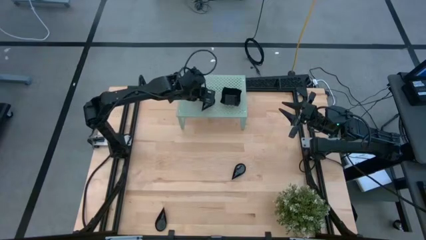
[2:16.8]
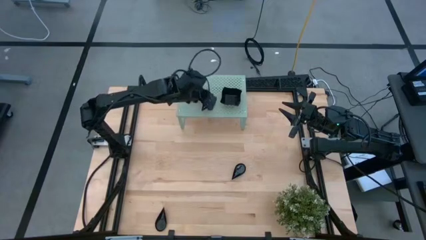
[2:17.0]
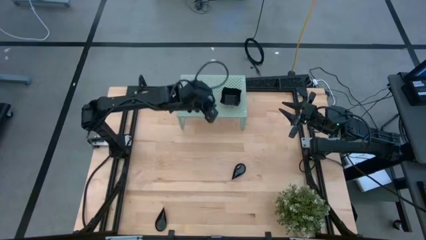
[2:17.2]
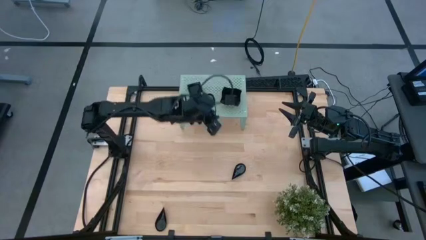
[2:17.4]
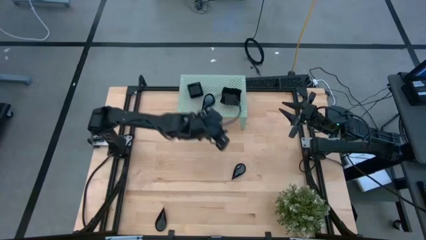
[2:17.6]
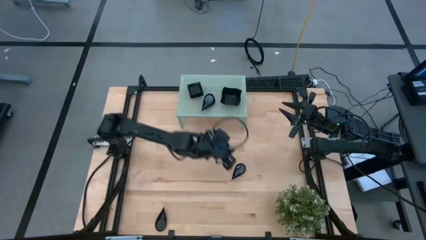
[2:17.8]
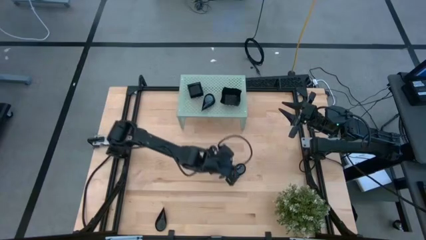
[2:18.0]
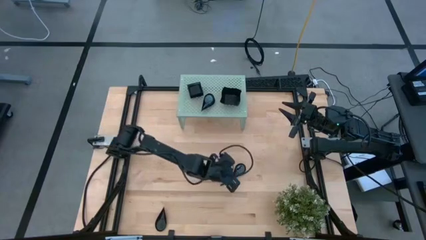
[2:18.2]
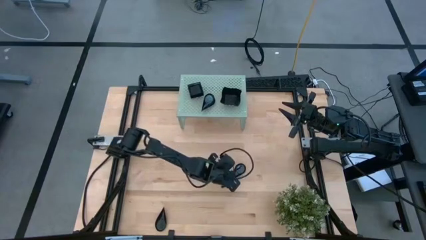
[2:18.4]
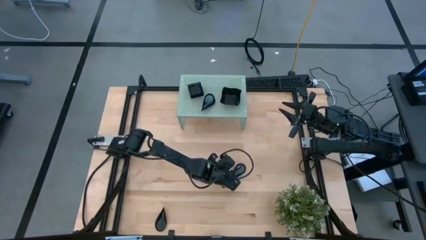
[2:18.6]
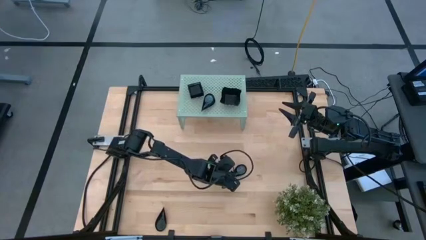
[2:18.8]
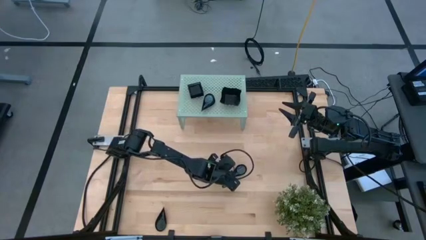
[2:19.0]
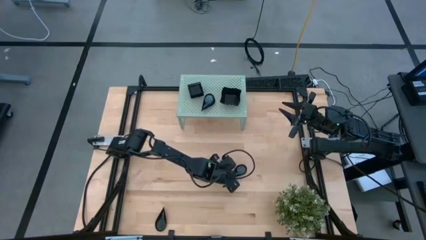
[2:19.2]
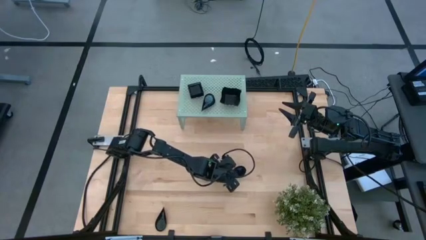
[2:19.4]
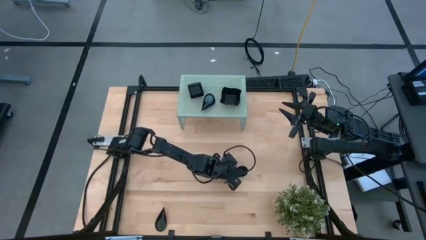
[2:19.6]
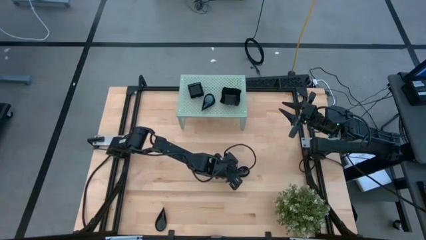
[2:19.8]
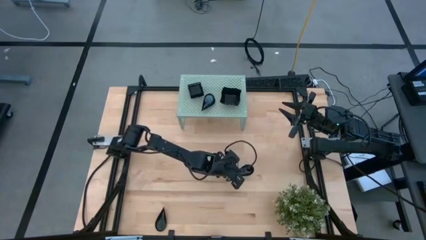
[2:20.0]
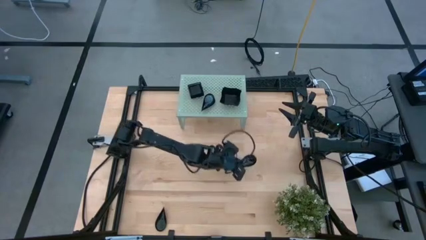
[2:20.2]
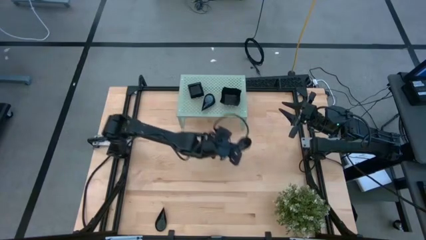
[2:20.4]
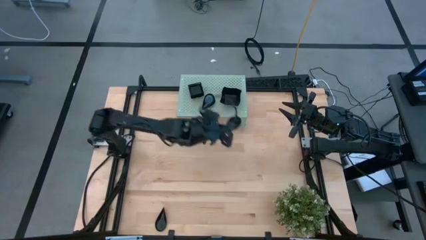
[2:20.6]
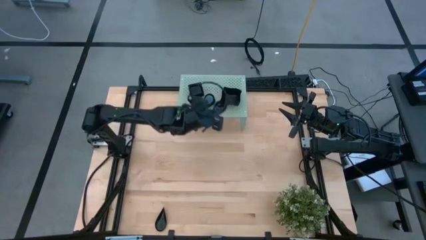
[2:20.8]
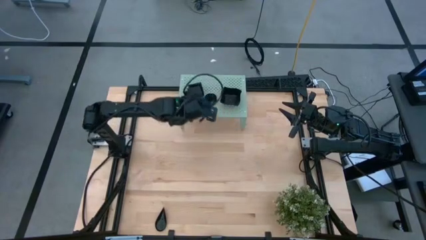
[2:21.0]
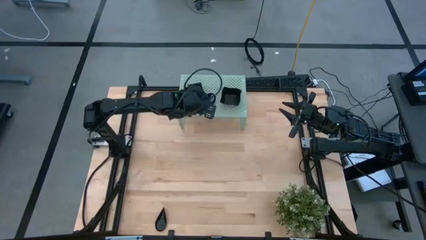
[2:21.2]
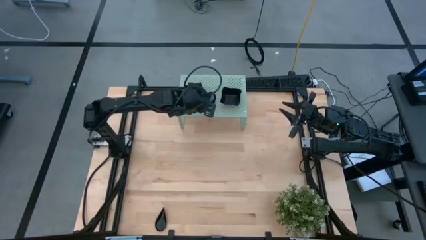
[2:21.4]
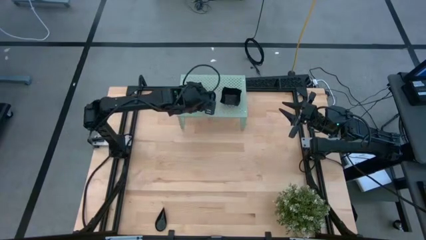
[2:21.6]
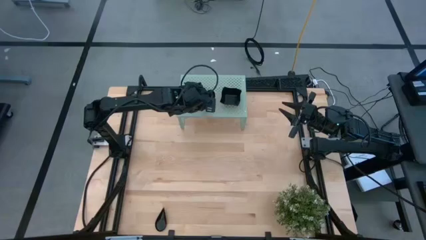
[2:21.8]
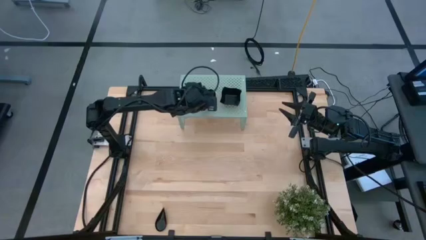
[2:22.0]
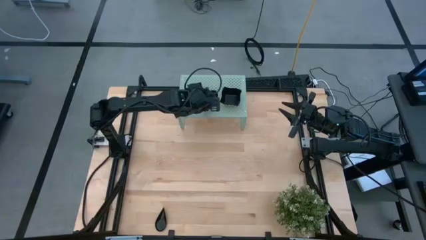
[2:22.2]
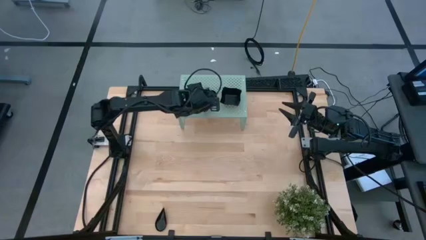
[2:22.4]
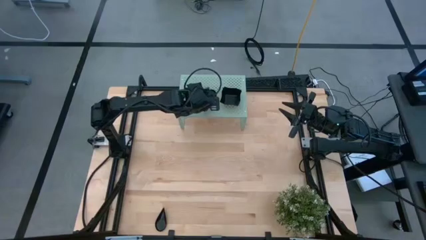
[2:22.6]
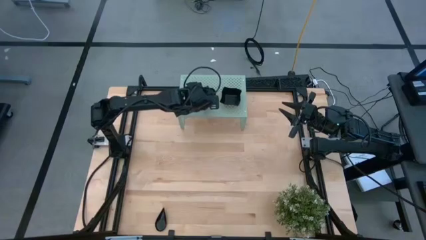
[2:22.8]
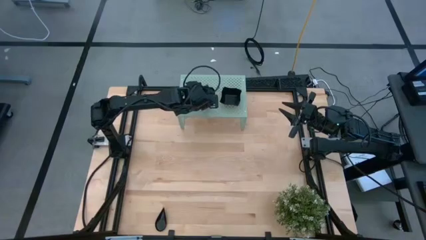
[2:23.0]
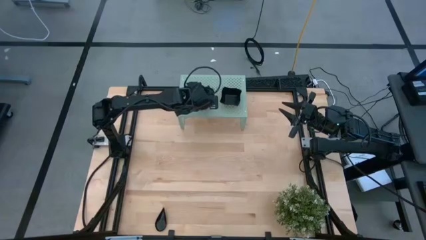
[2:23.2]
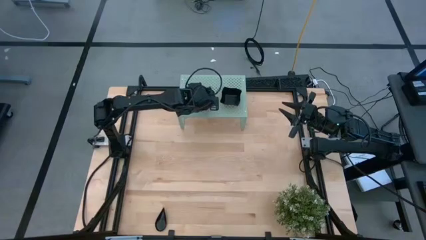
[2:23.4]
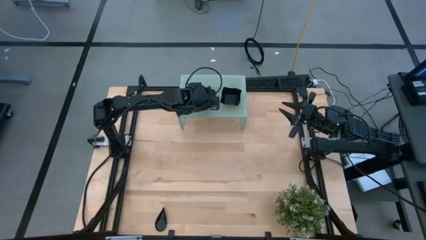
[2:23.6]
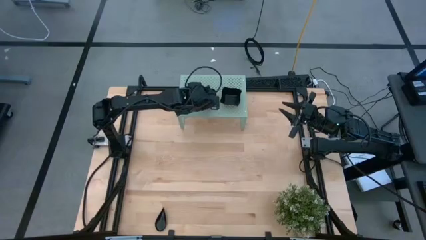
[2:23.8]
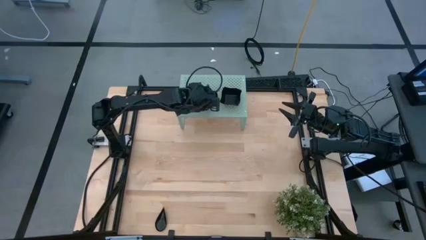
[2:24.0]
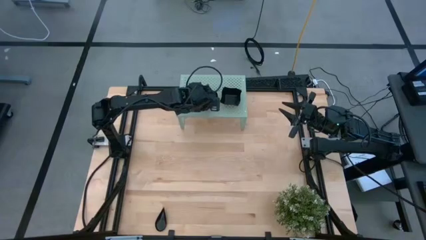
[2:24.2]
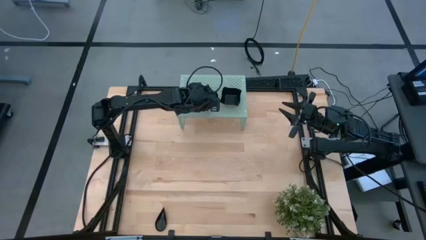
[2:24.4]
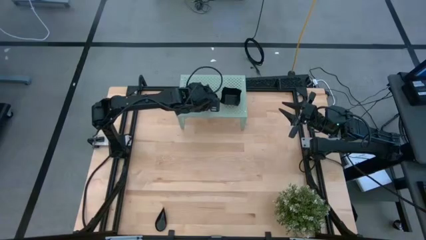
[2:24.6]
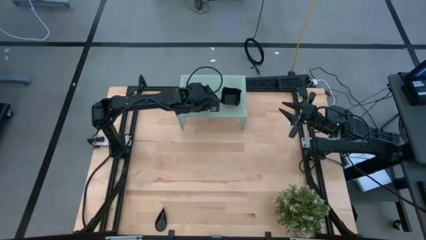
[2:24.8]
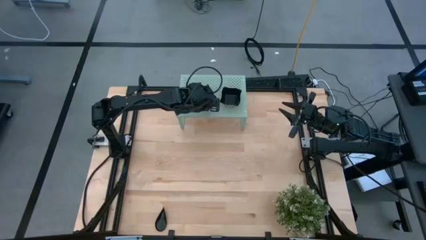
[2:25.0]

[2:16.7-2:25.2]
Task: Pick & Place Mini shaped plates
Stack the black drop shaped plate on top of the other black drop shaped plate on the shelf

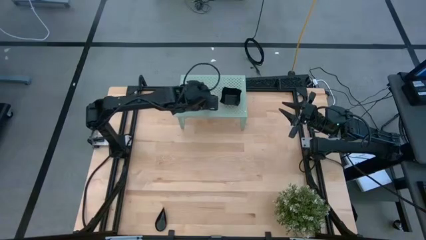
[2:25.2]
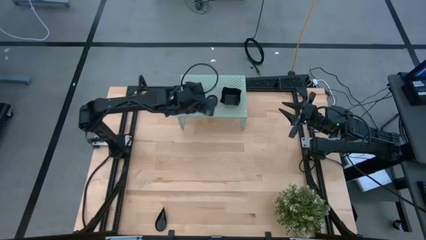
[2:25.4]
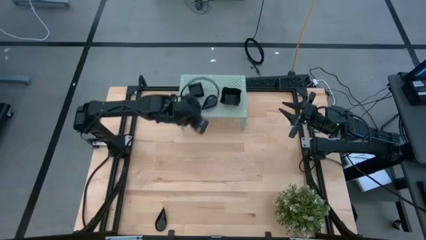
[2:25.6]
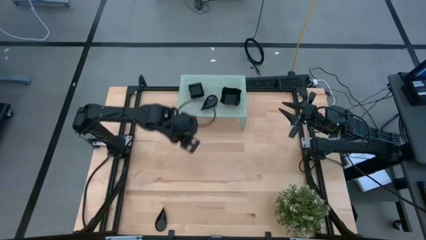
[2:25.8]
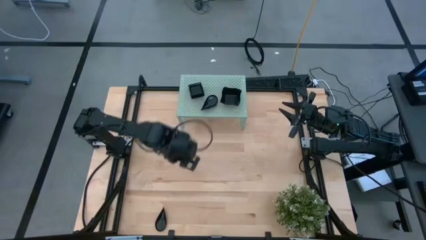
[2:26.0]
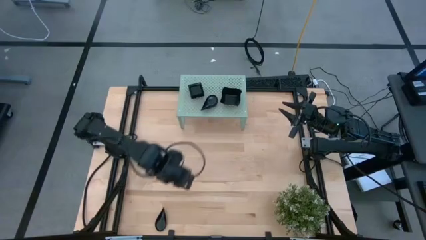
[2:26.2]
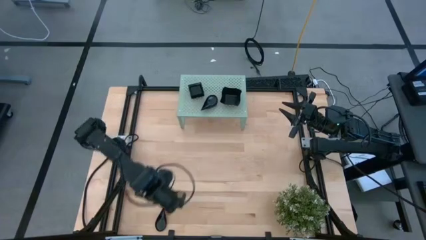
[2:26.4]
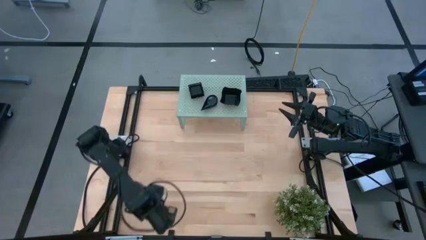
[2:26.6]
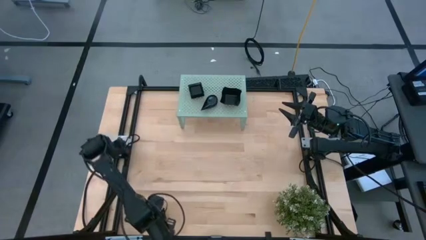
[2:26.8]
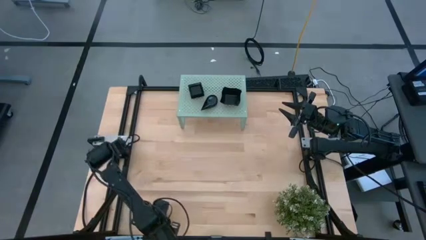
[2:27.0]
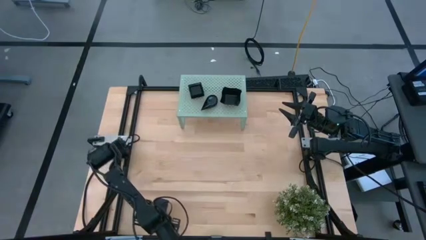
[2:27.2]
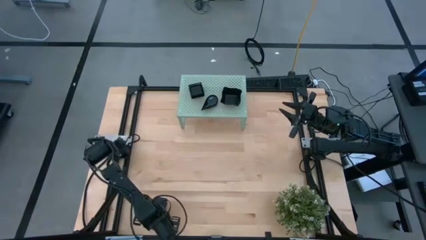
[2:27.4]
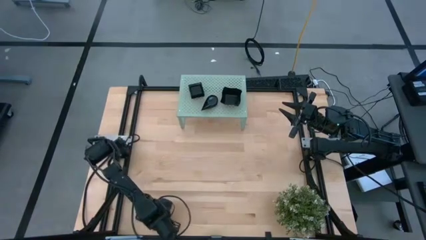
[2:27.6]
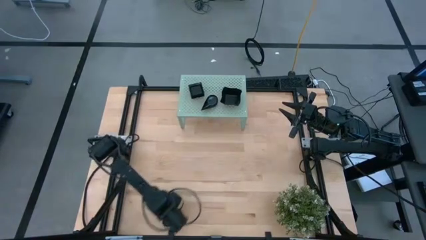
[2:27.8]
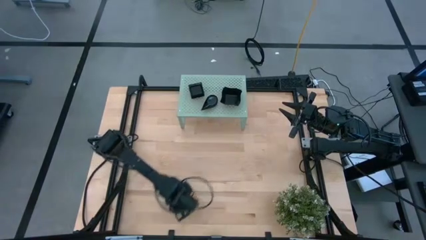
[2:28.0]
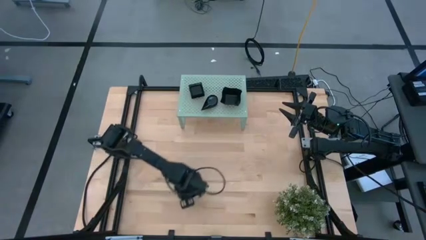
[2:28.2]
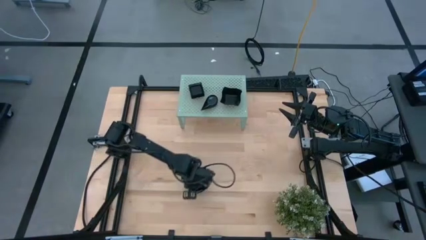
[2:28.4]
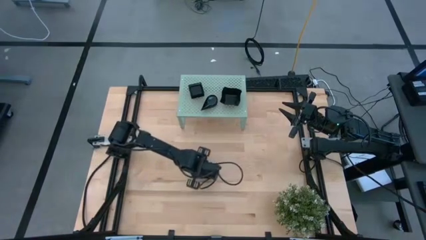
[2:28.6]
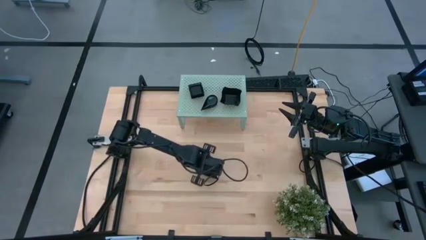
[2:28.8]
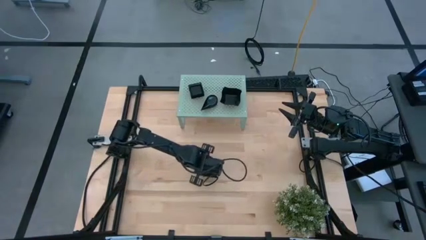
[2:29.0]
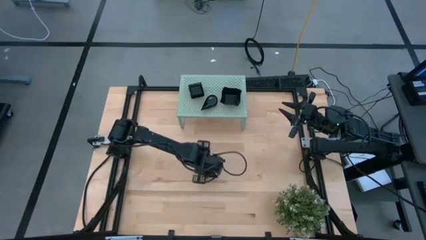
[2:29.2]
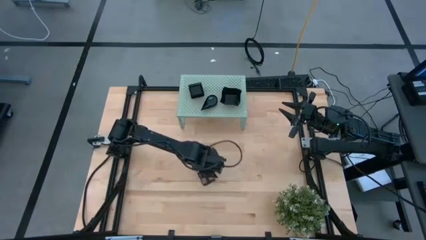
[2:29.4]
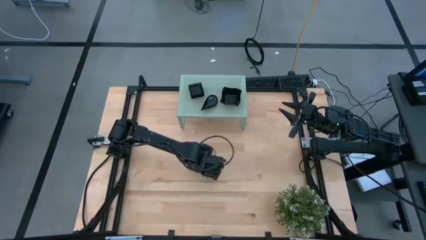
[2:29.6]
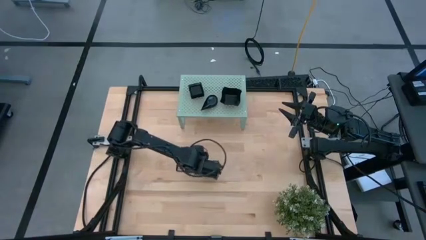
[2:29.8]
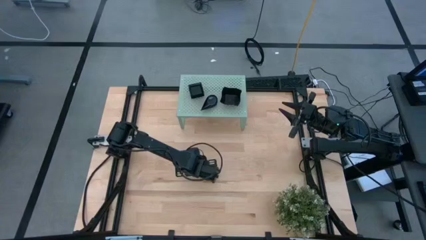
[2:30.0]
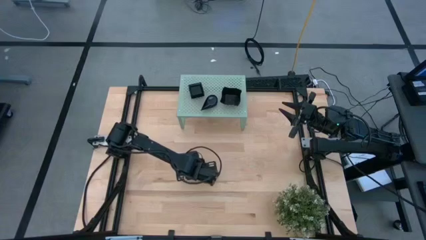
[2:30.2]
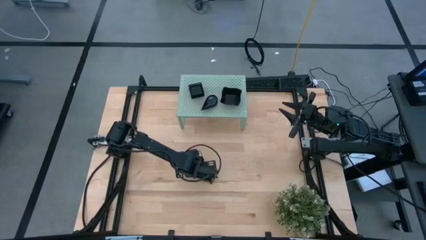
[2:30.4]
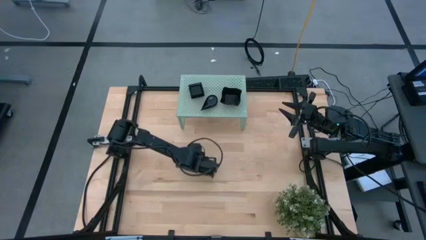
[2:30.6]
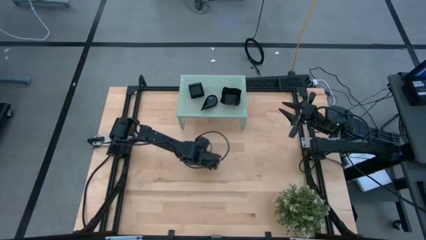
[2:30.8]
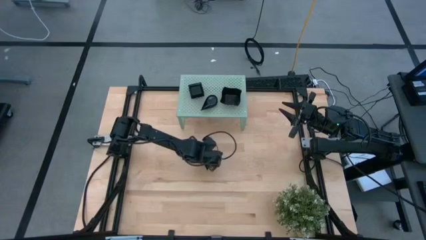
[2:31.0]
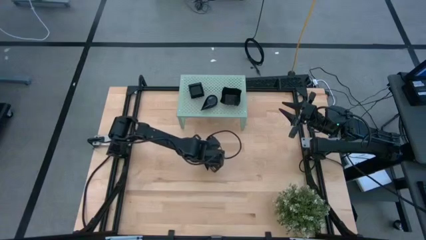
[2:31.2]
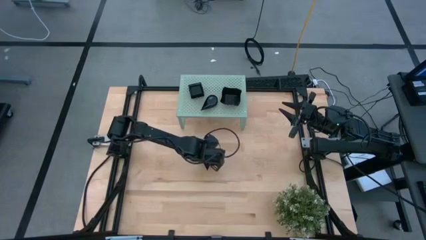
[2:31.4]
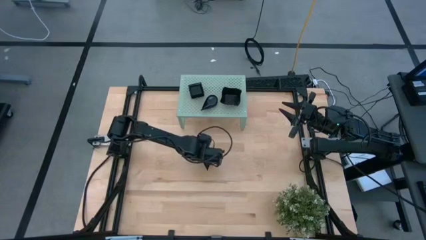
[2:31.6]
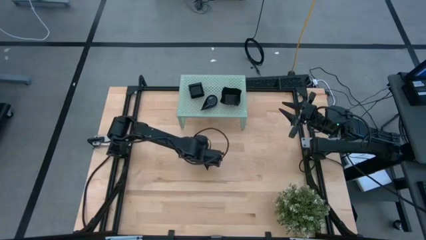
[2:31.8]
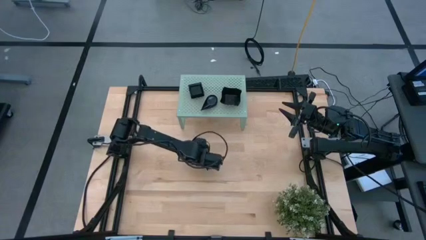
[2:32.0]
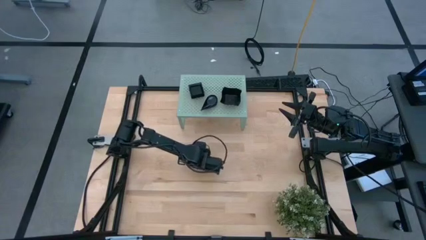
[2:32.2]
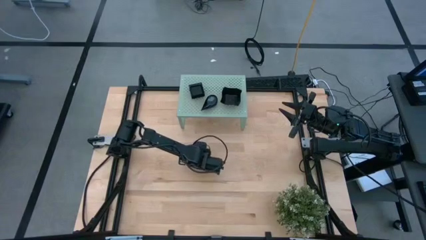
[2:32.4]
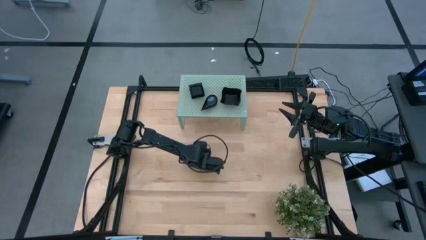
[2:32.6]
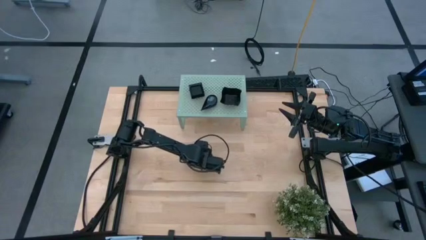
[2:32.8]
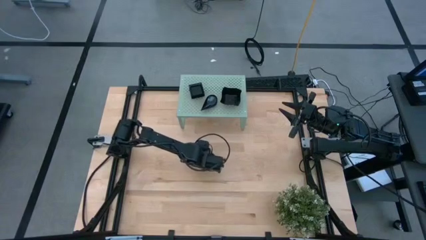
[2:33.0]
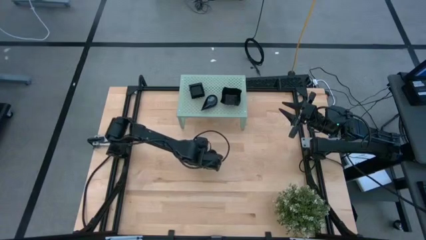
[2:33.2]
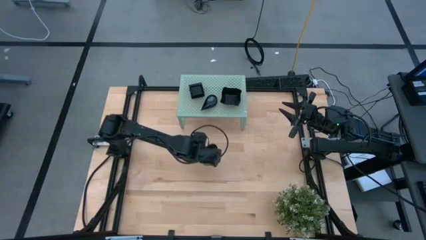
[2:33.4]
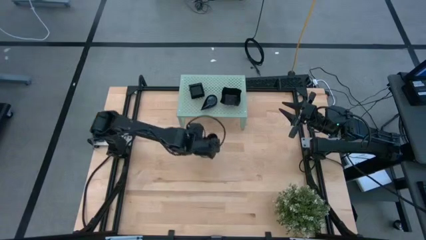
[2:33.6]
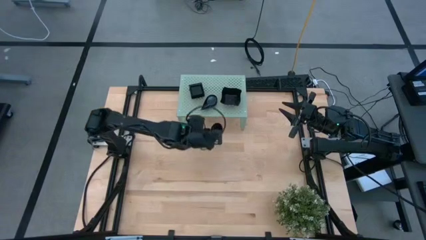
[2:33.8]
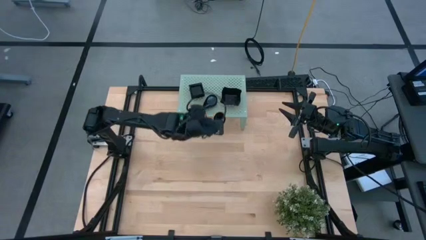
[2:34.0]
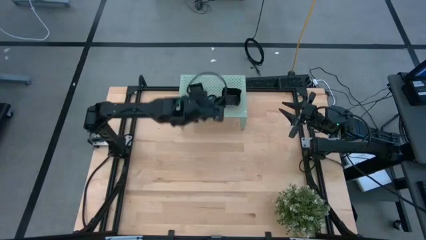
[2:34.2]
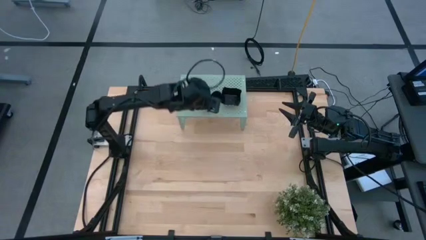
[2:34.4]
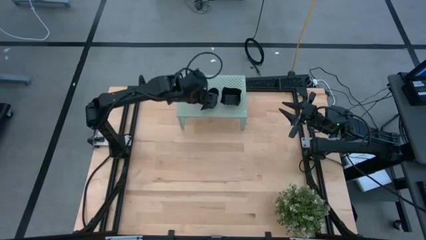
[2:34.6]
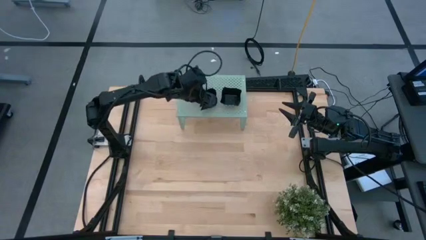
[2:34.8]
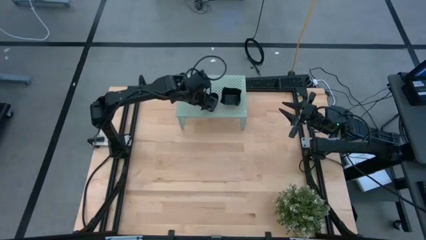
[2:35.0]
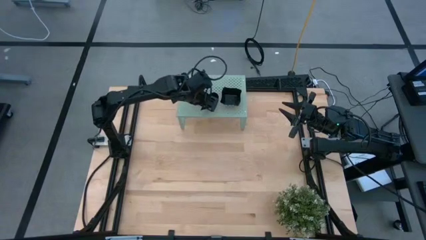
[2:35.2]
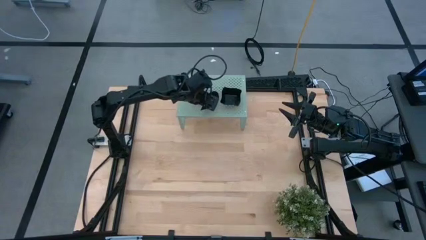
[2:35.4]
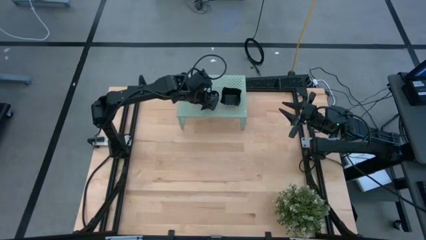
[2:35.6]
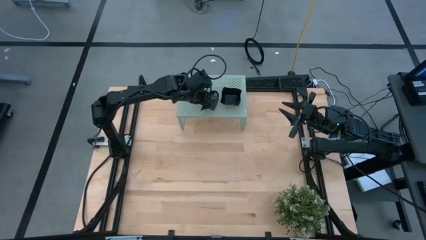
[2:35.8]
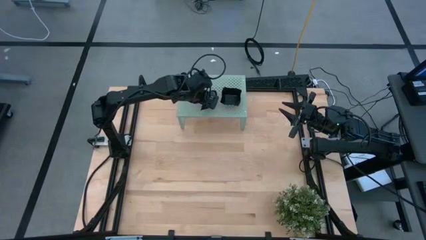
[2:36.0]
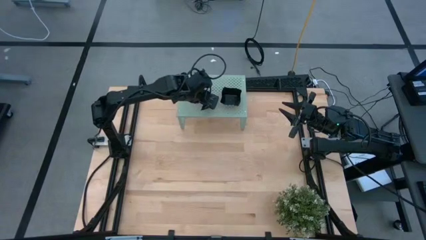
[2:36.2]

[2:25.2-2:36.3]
Stack the black drop shaped plate on top of the other black drop shaped plate on the shelf
